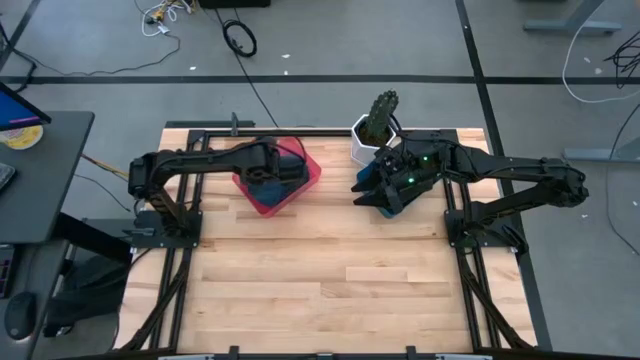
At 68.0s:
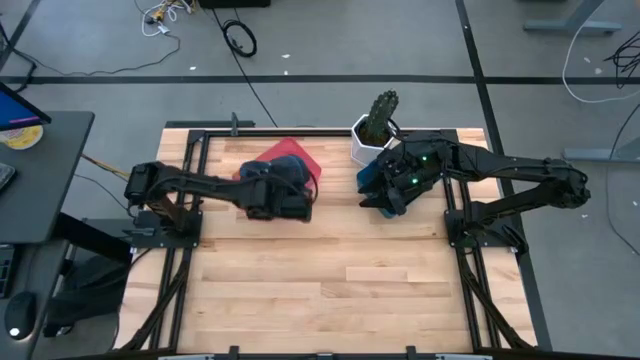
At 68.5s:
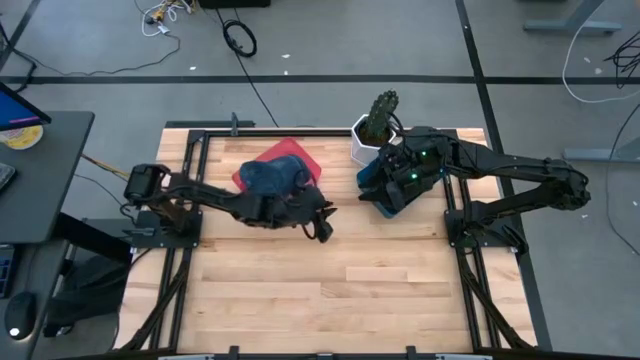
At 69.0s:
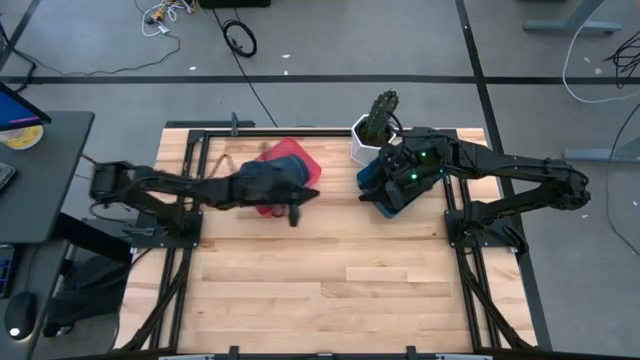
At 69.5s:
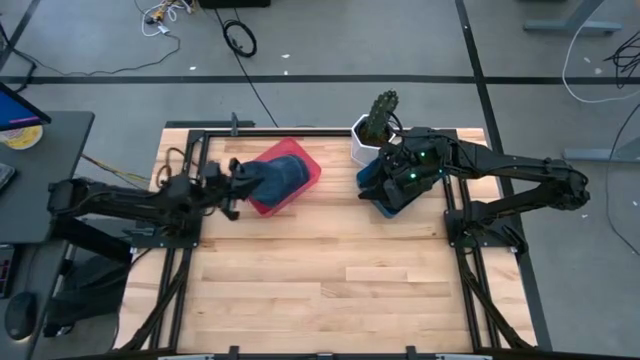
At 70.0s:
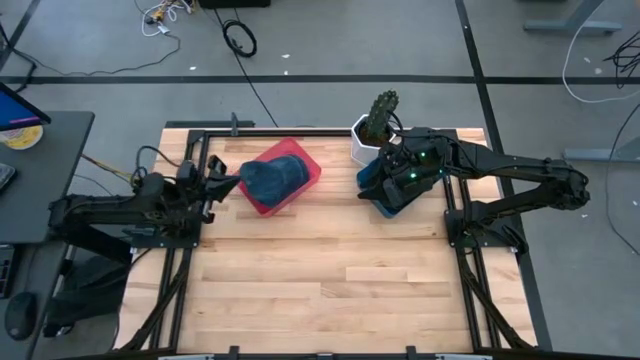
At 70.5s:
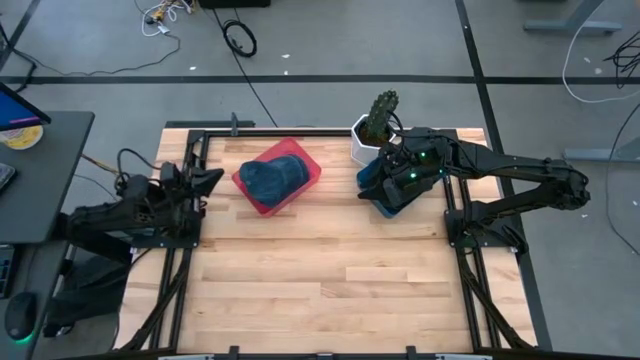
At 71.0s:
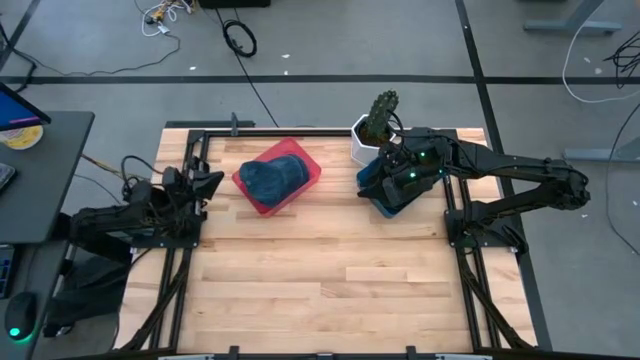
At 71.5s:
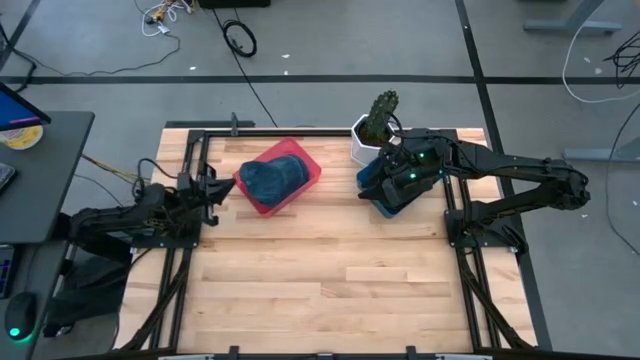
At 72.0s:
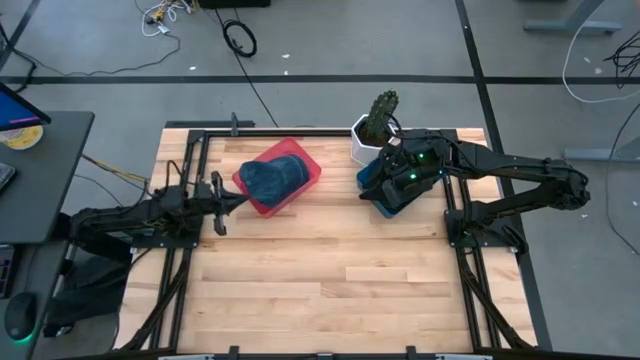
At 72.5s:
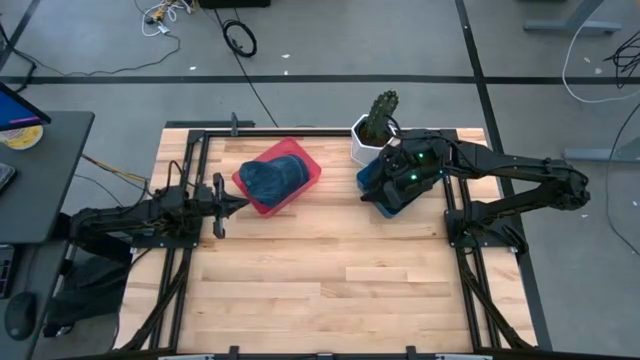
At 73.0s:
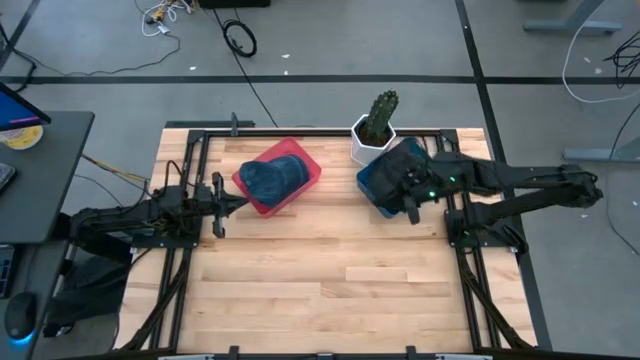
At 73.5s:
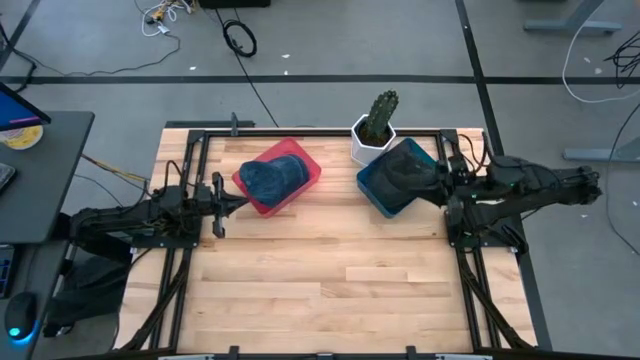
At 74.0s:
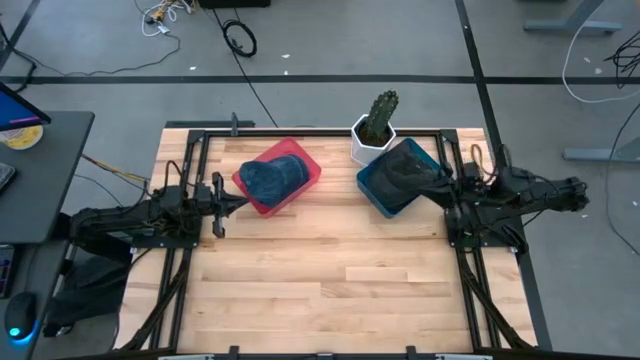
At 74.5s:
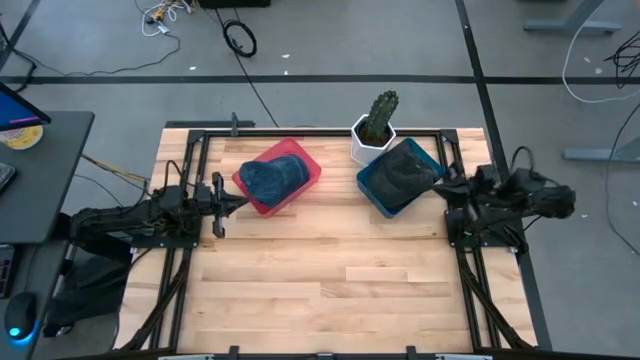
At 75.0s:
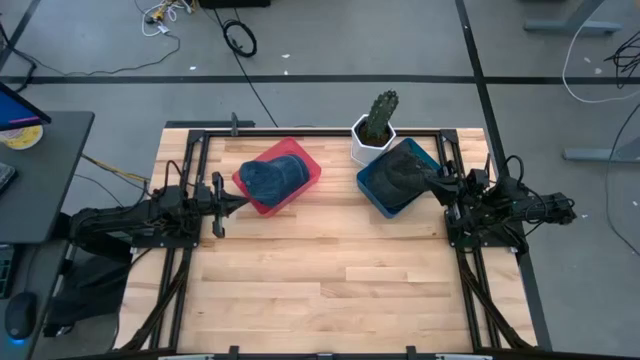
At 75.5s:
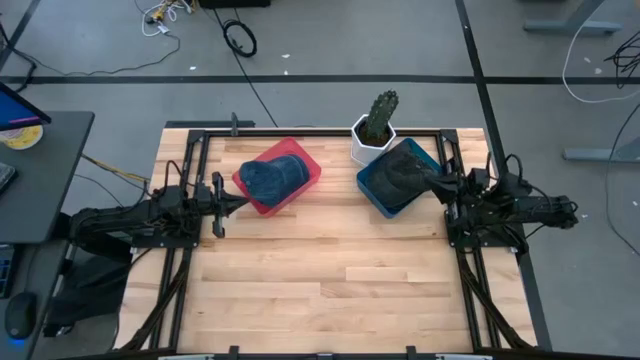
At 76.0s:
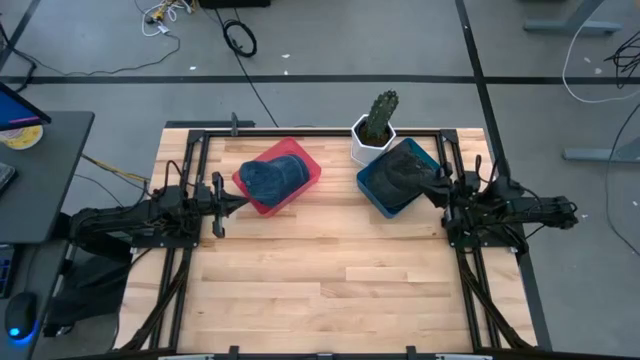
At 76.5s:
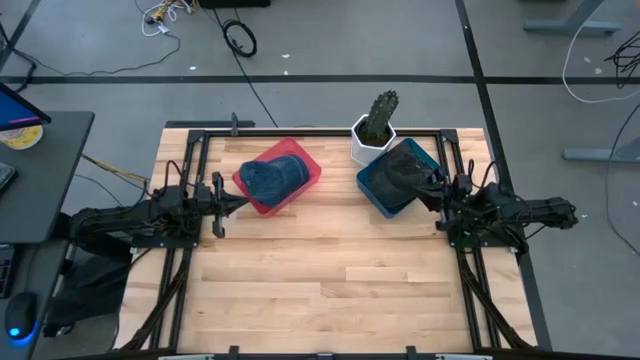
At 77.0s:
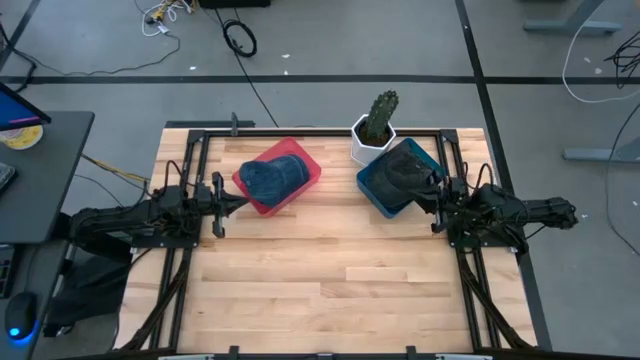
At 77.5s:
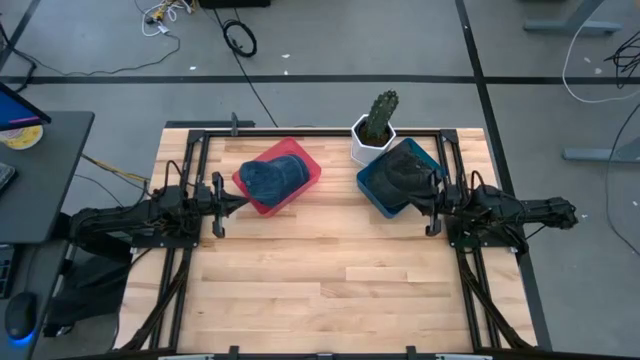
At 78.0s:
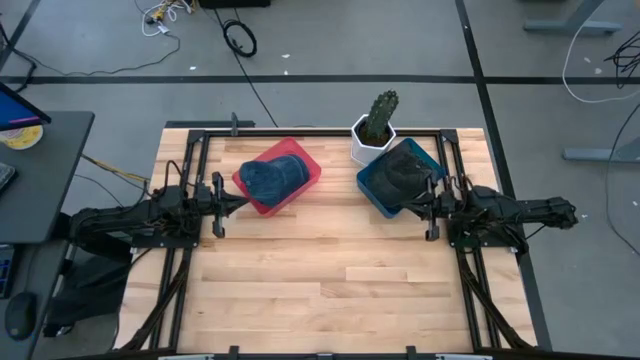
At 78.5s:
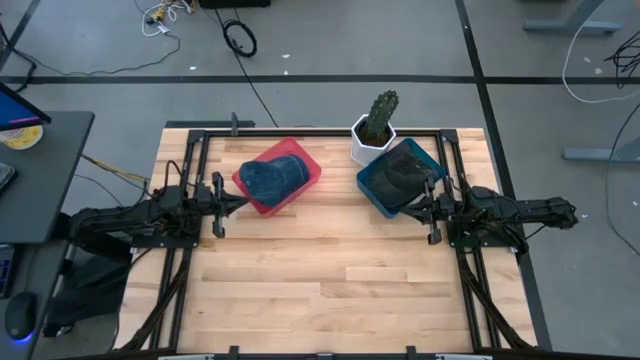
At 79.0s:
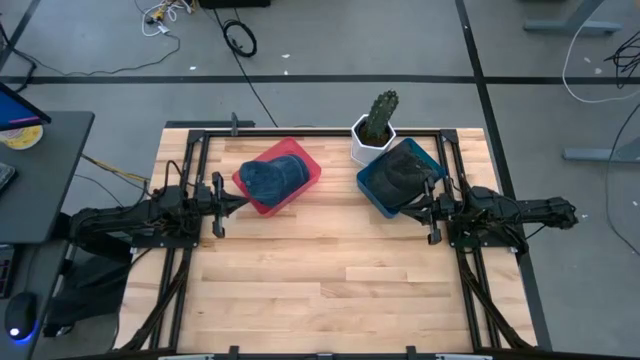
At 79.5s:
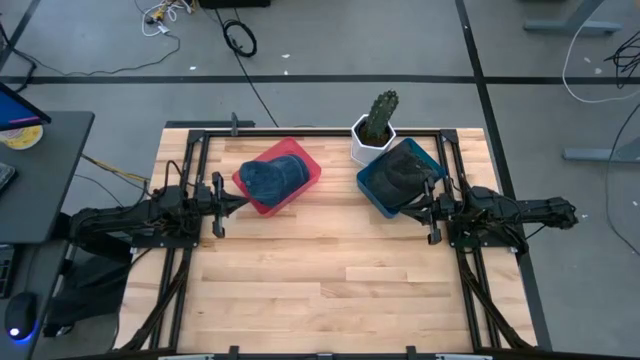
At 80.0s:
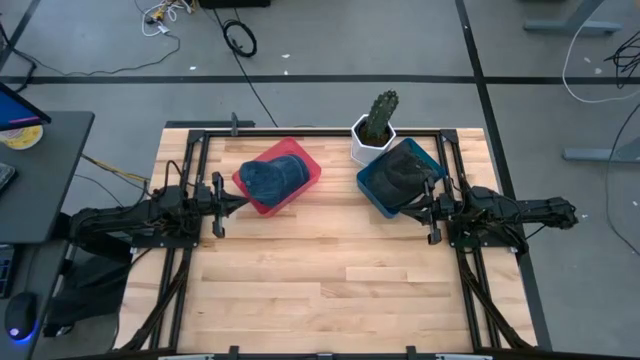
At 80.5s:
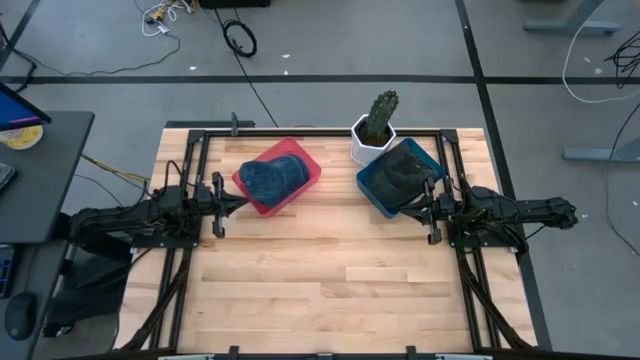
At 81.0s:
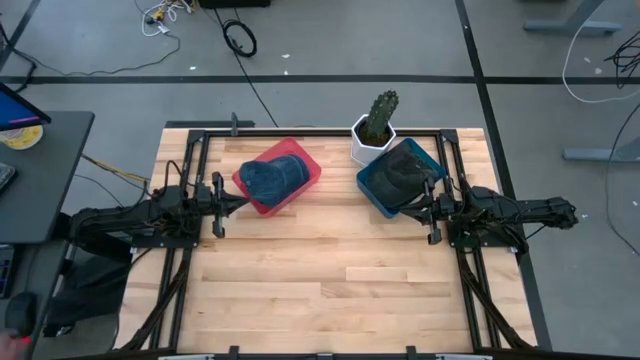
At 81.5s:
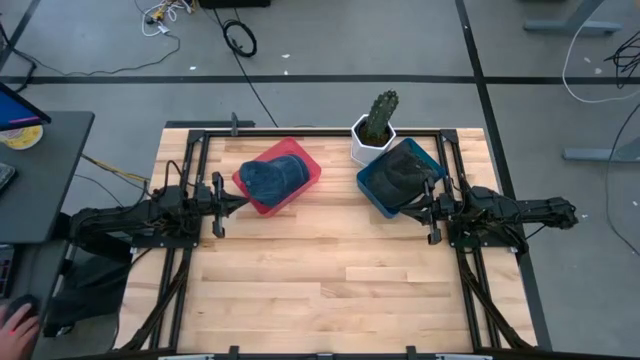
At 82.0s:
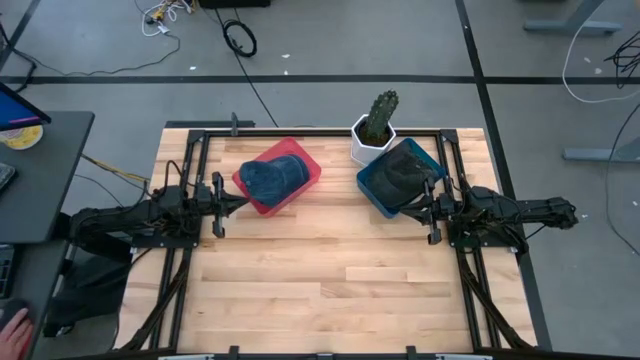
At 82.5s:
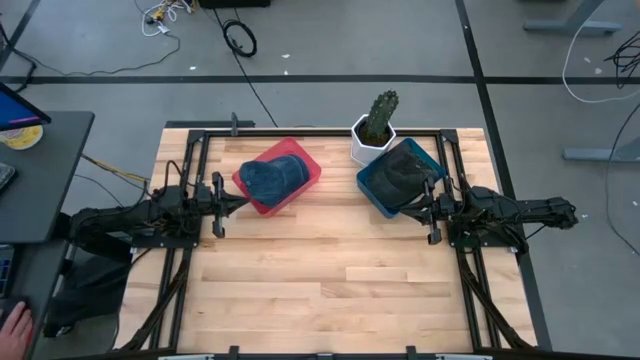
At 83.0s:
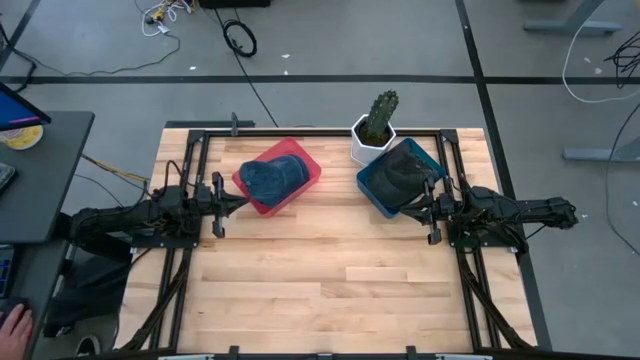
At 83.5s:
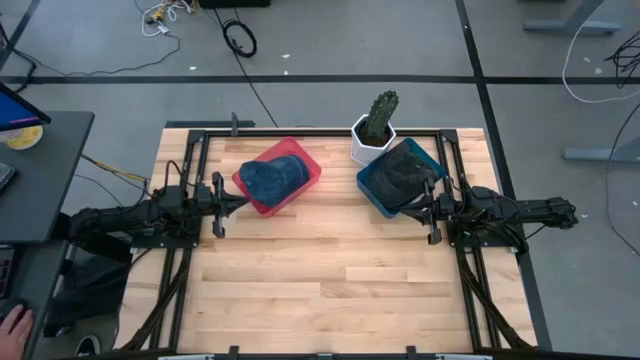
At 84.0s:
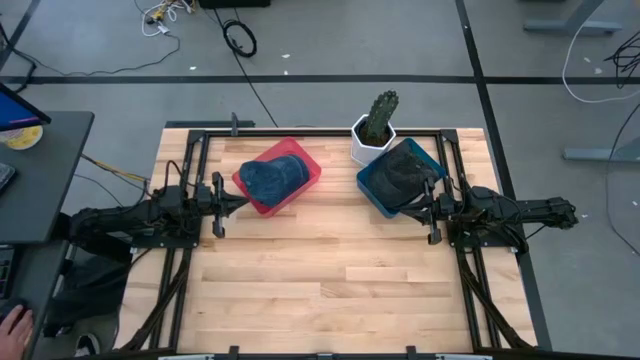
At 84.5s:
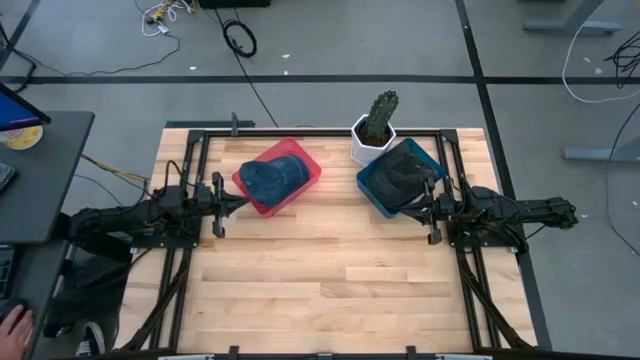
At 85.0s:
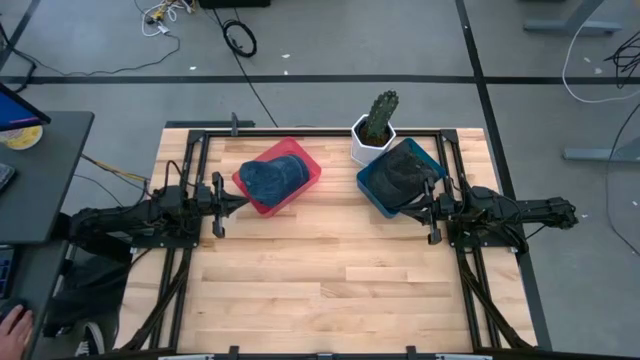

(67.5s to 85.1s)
Task: Pick & Place hat
Return to Home Position

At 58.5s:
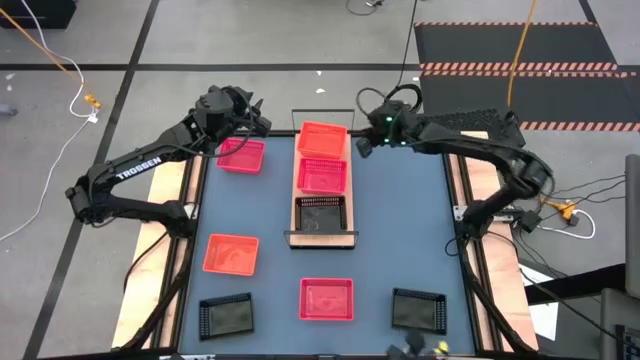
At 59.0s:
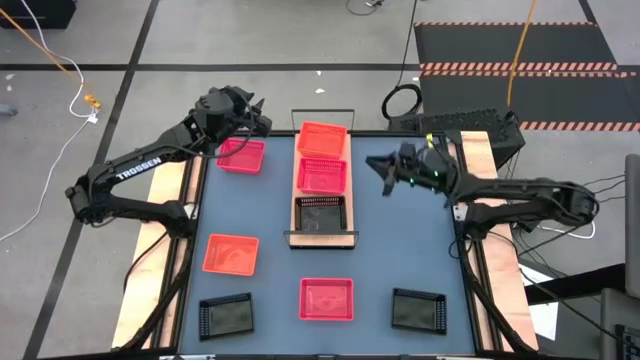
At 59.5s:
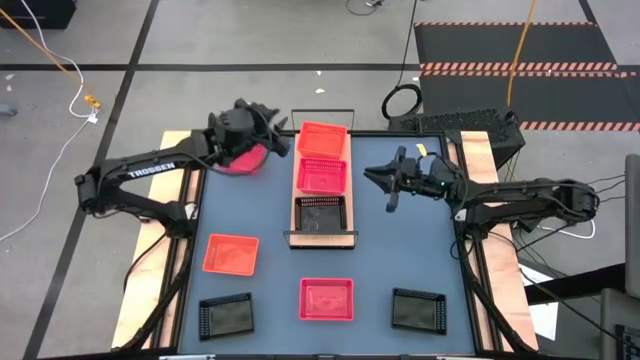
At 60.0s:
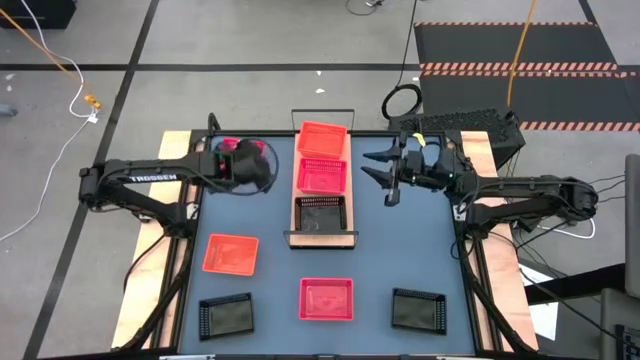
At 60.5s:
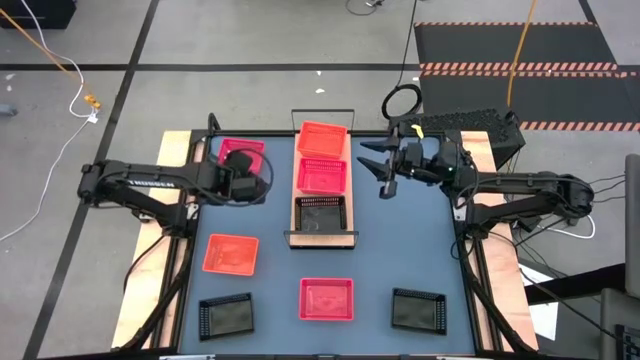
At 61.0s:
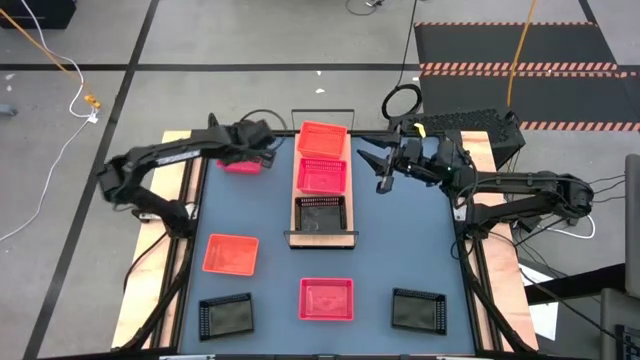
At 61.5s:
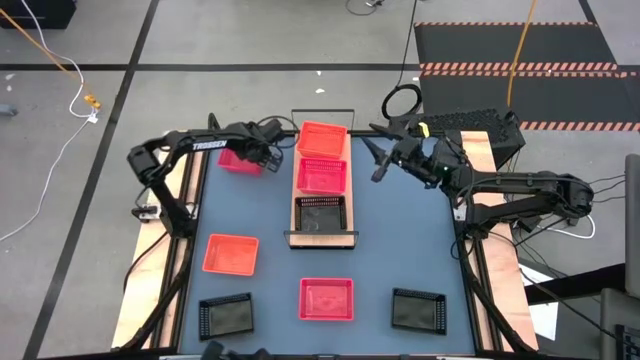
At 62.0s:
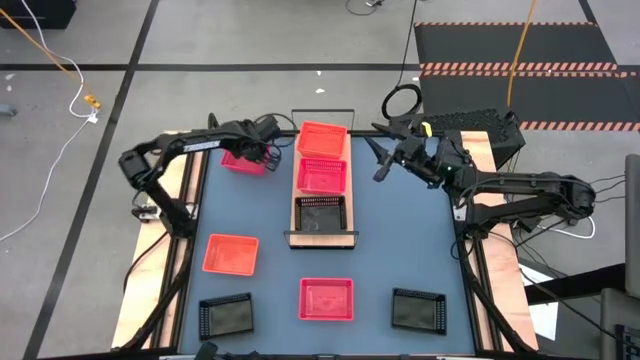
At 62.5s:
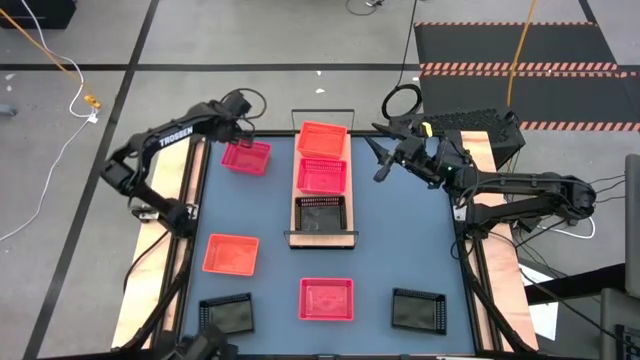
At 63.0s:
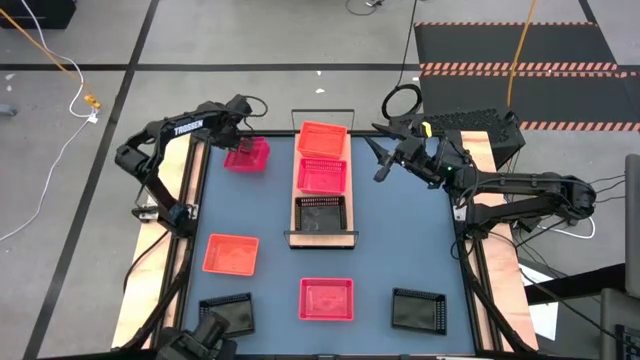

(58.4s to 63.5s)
Task: Stack baskets on shelf by color
Stack the top red bin on the red bin on the shelf
